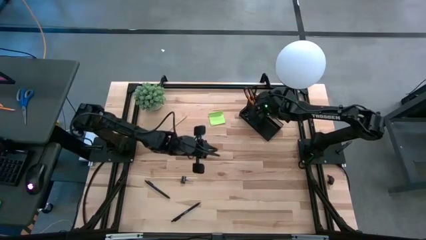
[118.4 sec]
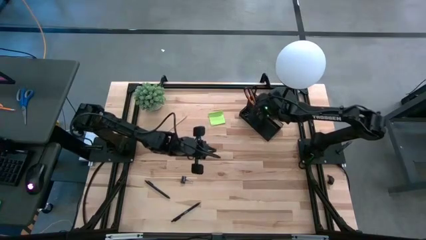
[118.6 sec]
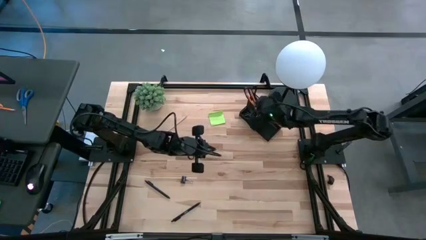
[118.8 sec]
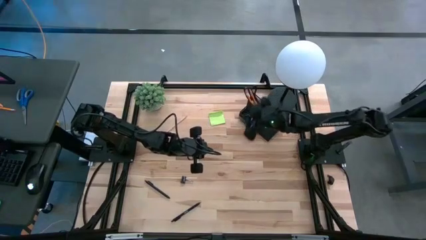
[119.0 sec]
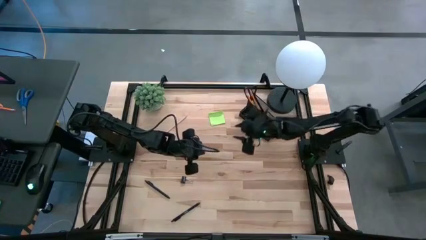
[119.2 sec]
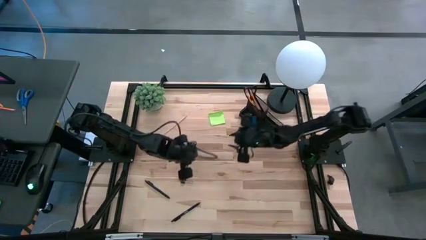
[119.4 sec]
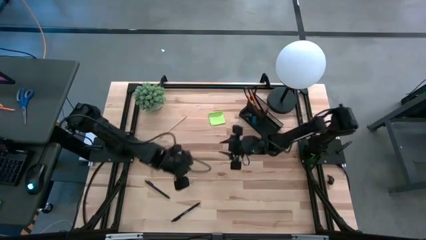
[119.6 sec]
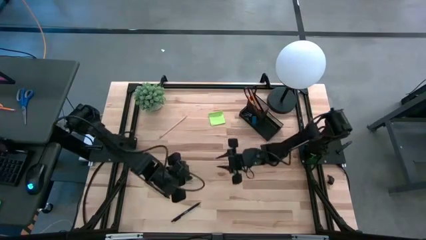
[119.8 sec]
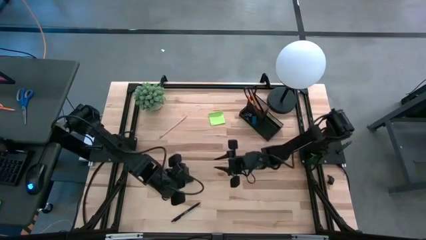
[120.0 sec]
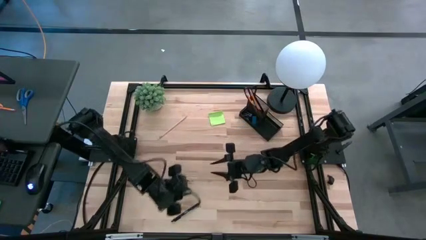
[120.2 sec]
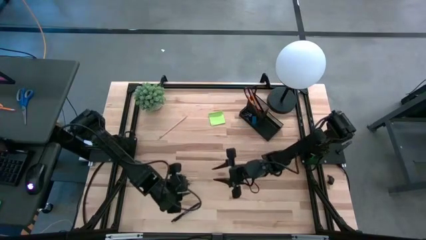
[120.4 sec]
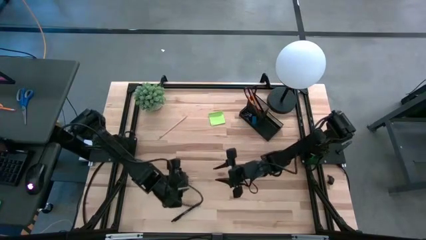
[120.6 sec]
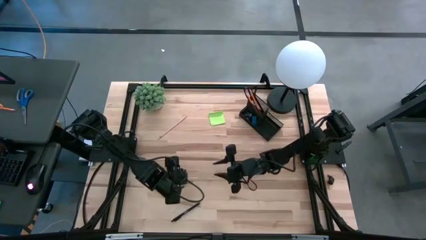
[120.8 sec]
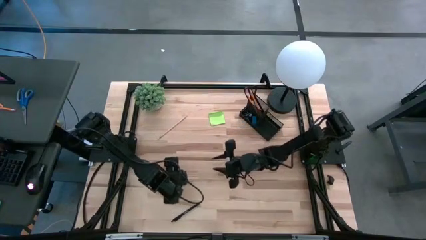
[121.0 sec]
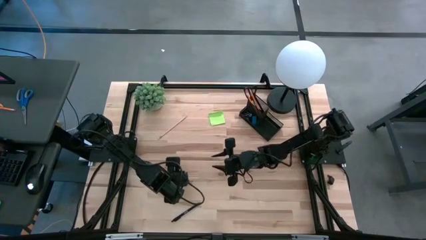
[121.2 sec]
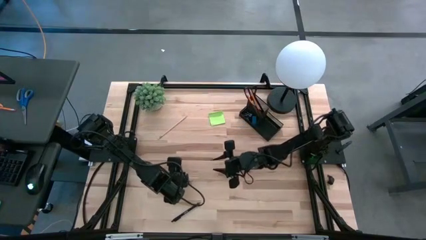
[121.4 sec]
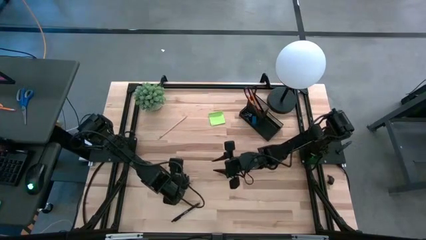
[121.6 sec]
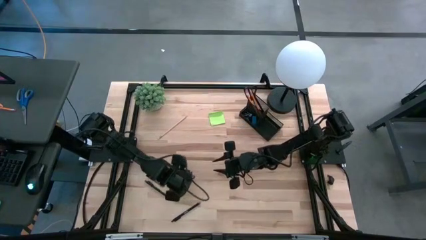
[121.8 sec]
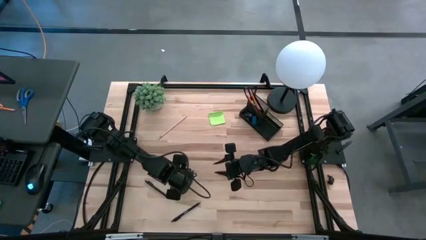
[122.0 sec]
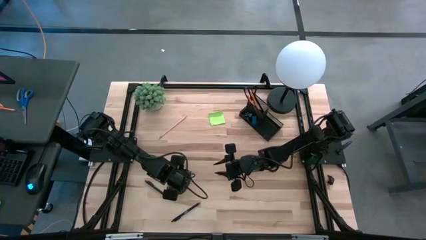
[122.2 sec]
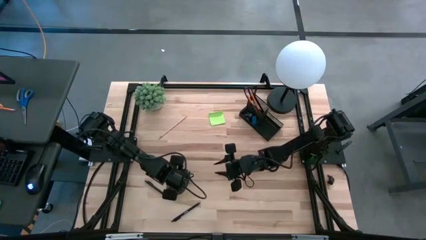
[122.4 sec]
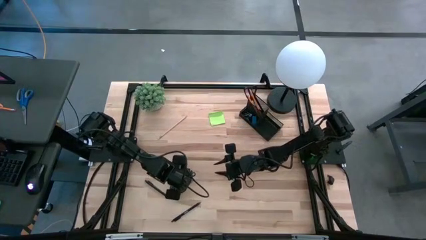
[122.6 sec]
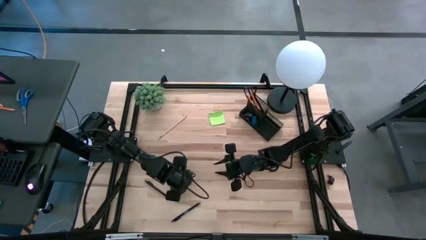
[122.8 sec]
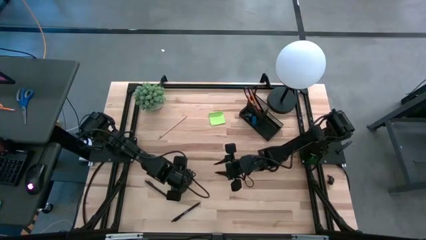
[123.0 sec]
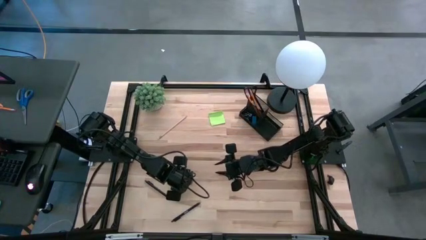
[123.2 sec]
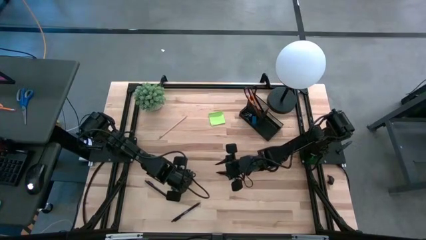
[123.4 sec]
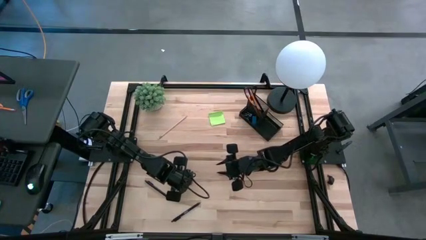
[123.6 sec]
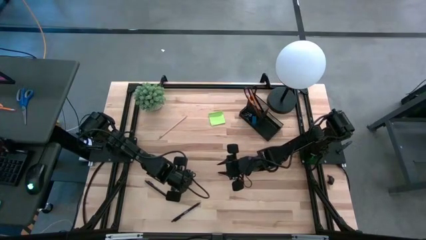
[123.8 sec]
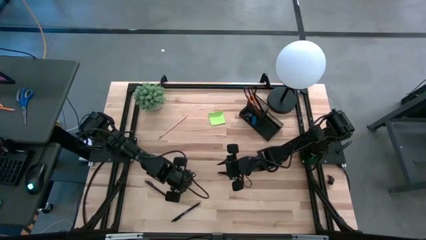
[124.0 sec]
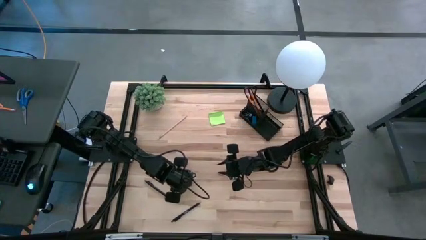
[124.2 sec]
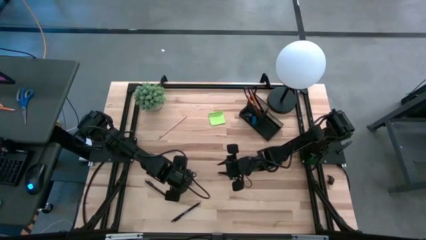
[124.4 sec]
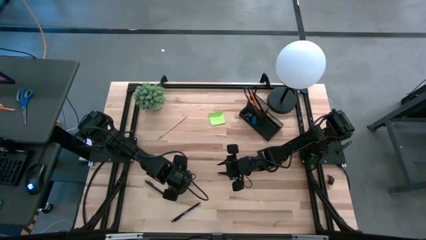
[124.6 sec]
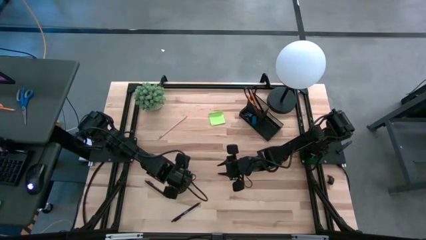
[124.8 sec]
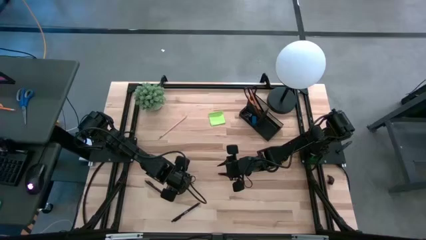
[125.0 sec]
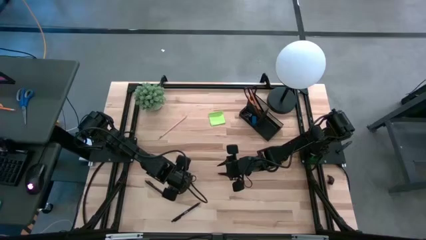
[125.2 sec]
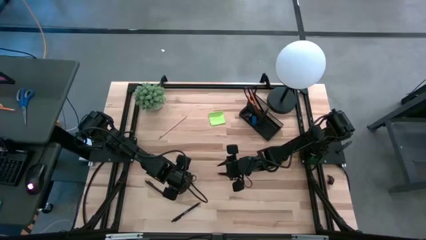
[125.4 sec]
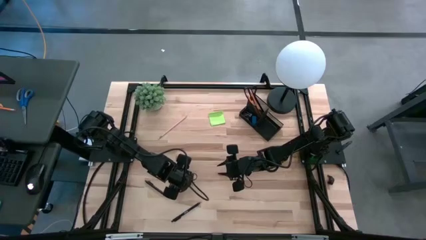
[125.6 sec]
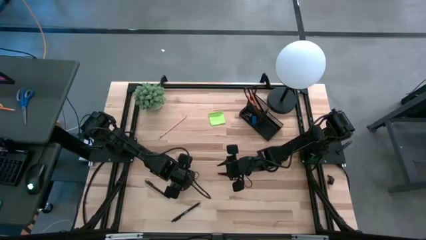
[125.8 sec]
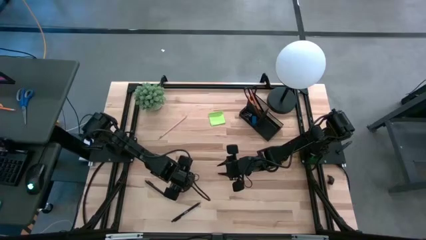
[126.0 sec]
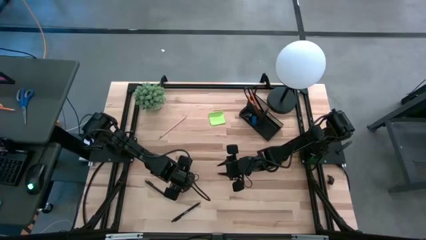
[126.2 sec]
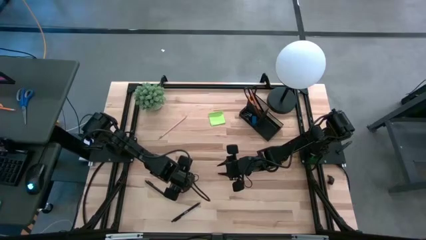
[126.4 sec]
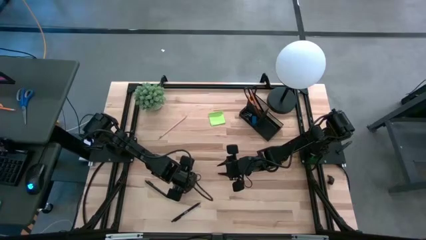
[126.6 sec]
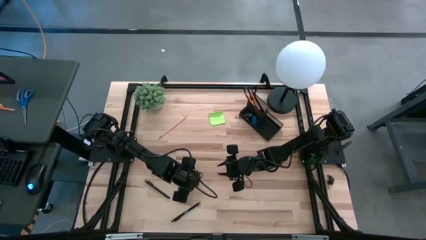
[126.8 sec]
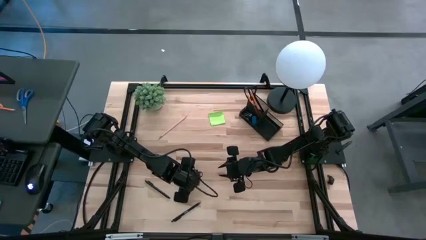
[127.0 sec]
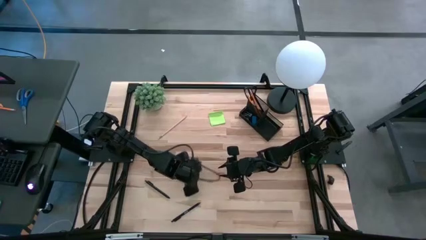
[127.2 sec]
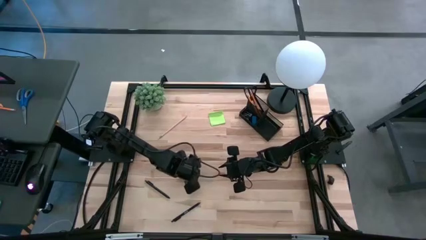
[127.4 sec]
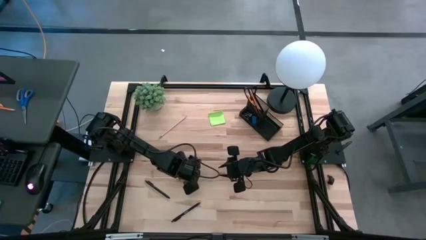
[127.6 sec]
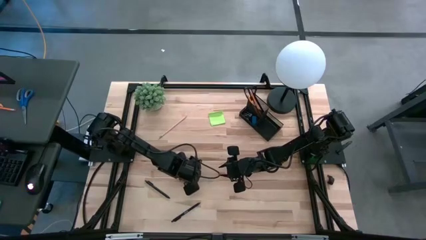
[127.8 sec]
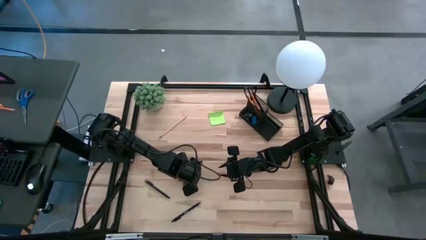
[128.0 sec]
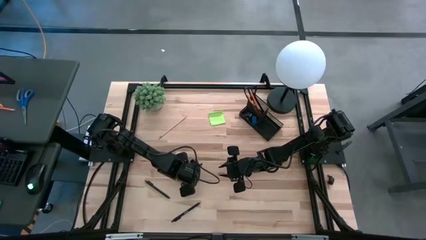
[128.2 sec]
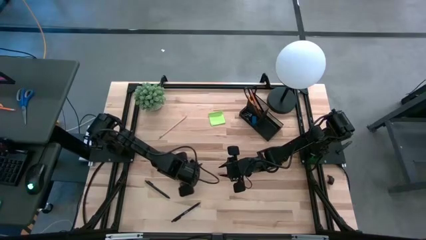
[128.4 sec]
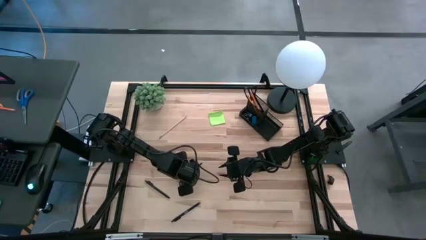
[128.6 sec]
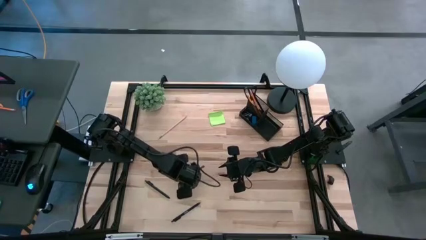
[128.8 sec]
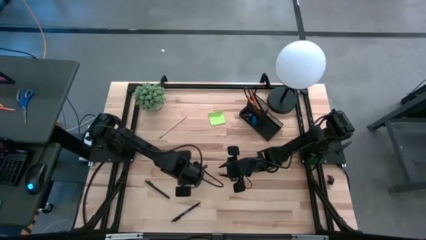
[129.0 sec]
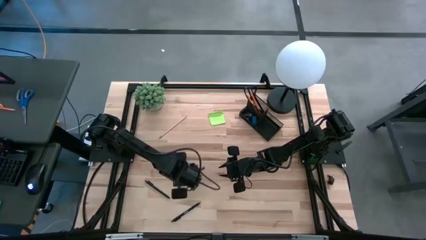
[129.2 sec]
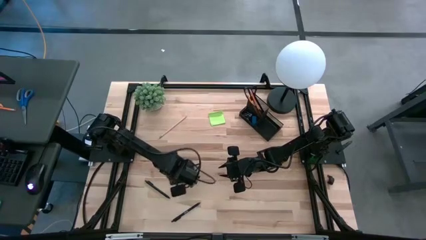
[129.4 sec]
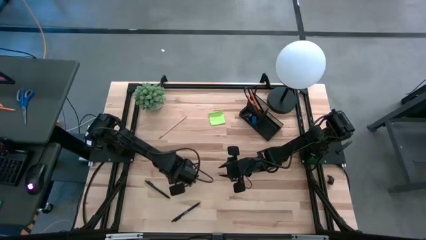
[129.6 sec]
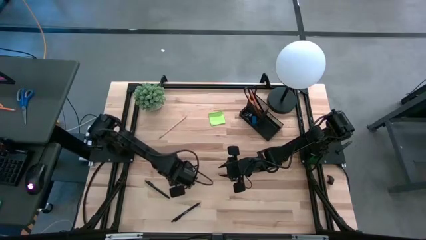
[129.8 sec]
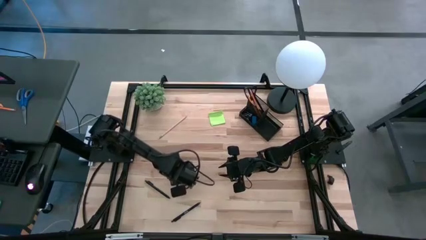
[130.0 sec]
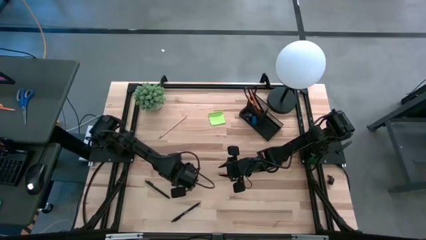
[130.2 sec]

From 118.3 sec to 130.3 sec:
Task: Pick and place office supplies into organizer
Put the black binder clip into the black desk organizer

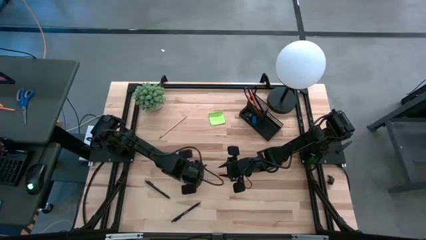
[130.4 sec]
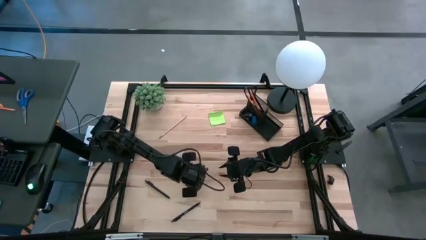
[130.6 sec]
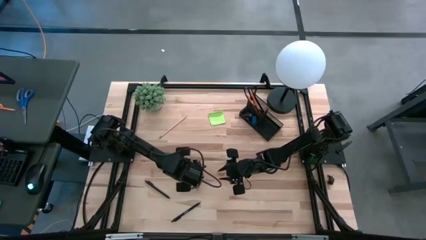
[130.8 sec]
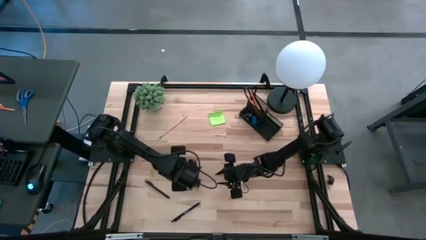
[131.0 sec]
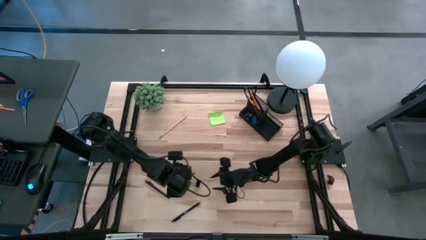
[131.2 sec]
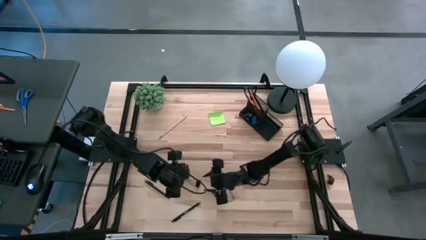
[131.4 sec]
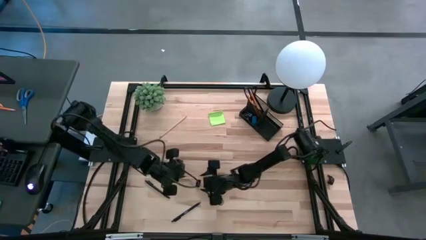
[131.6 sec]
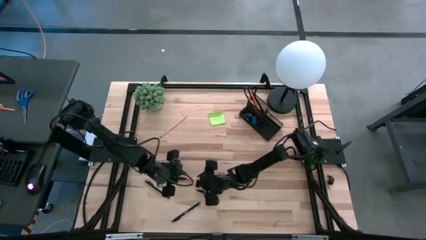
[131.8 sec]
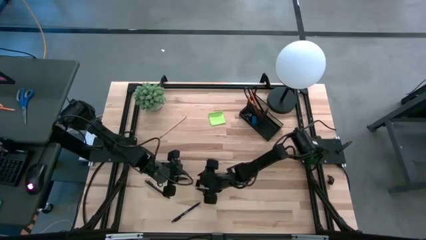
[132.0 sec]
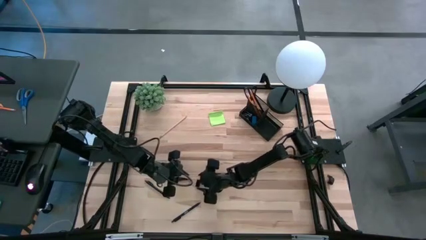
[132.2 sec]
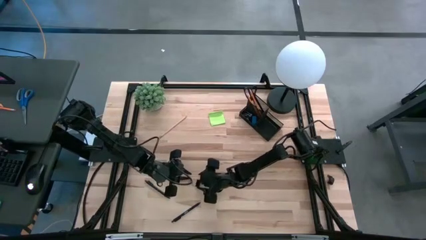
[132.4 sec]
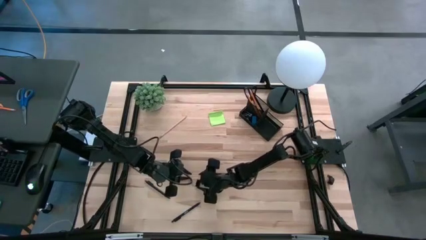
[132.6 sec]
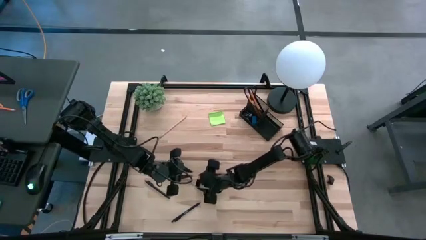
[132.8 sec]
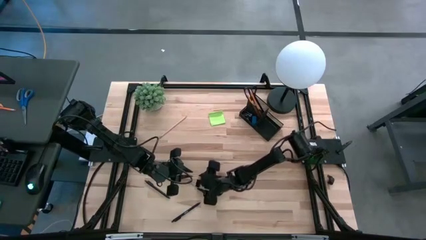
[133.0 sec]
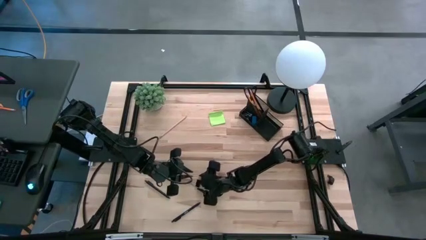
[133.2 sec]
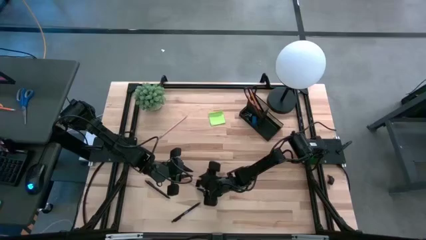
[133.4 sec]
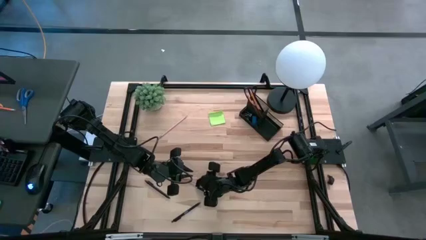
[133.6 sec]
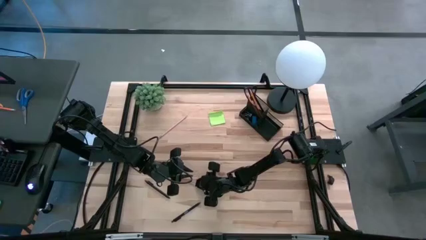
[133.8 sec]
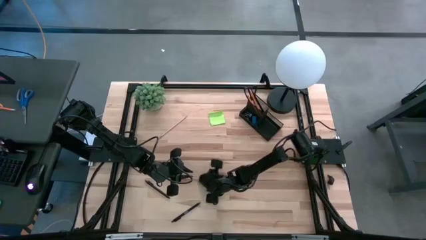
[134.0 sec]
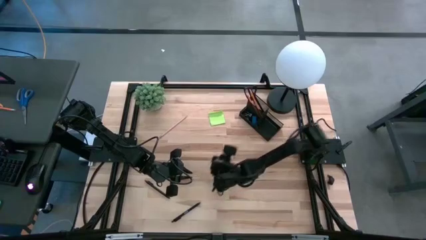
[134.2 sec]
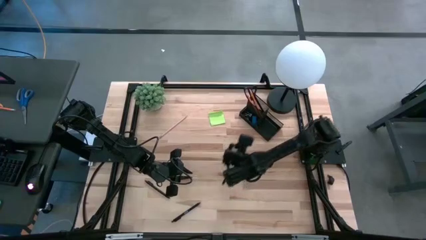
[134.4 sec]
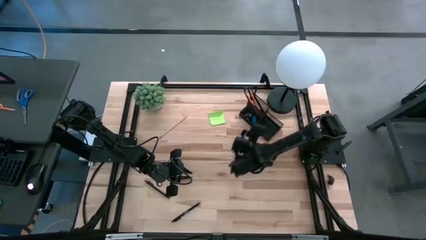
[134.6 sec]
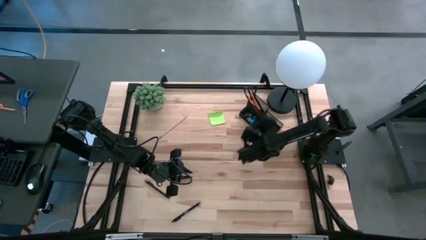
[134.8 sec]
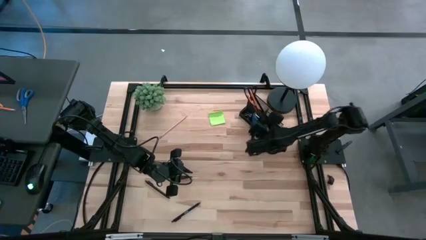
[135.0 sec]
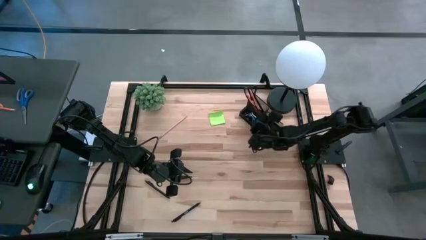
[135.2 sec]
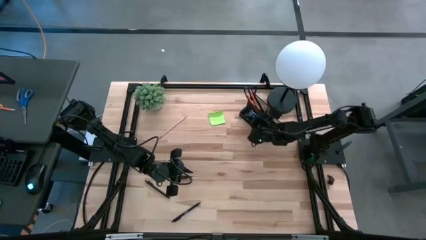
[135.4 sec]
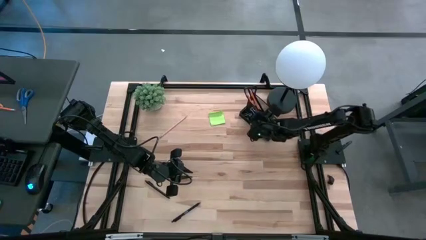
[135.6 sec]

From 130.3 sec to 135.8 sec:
Put the black binder clip into the black desk organizer
